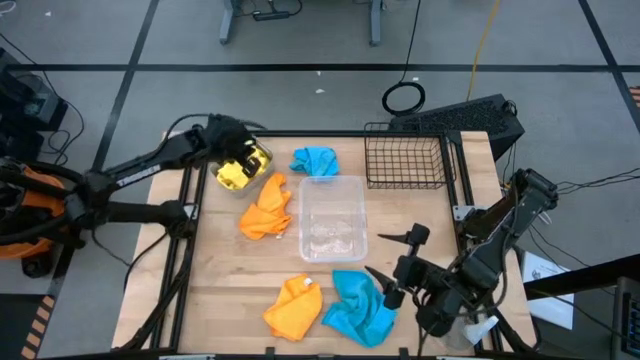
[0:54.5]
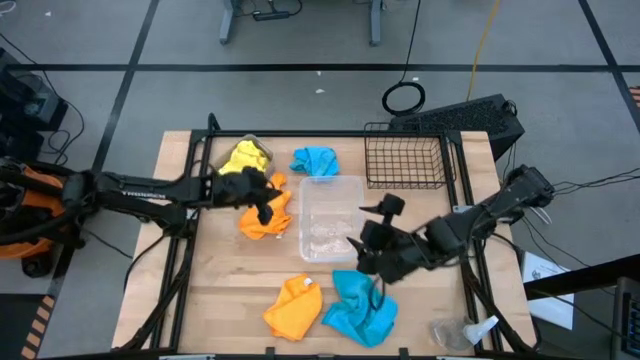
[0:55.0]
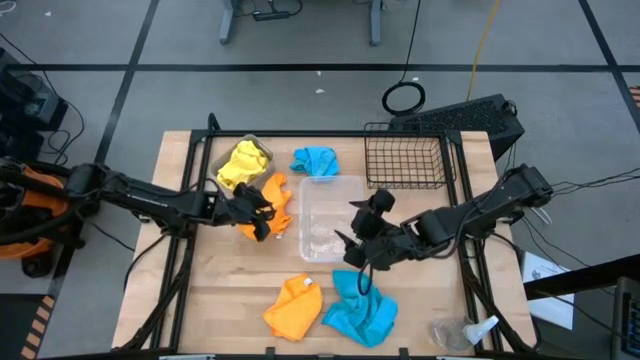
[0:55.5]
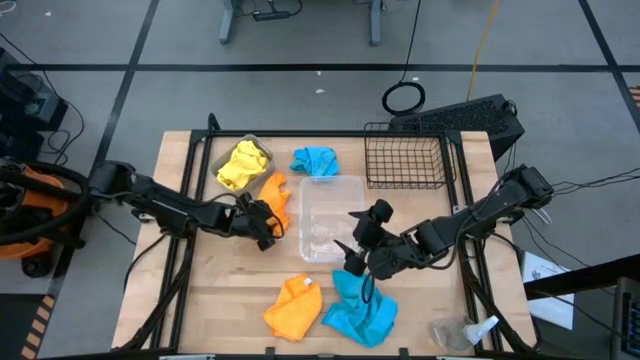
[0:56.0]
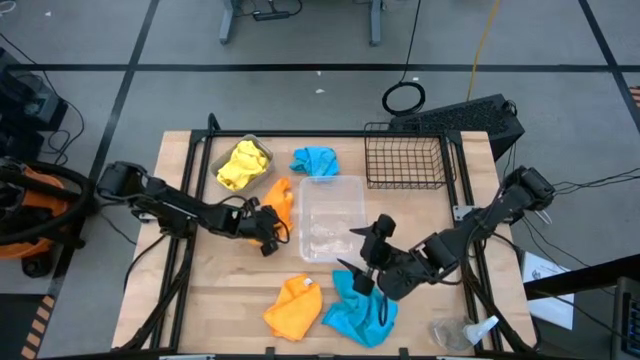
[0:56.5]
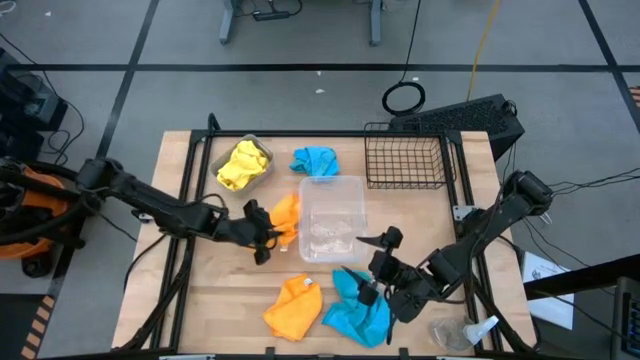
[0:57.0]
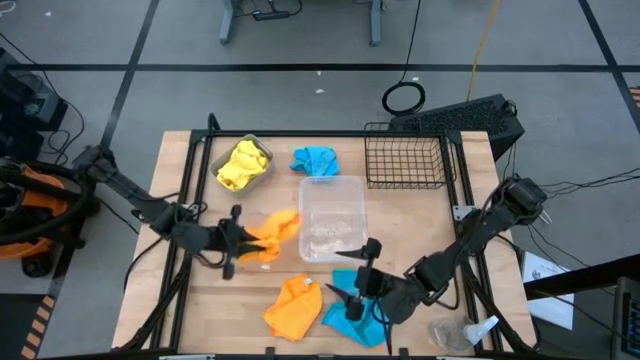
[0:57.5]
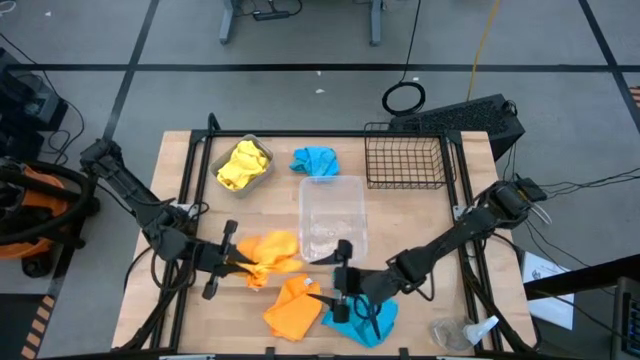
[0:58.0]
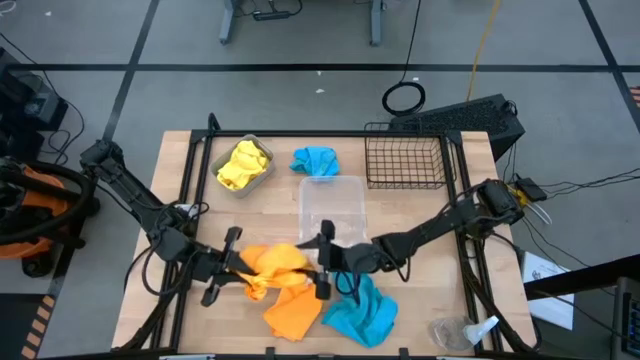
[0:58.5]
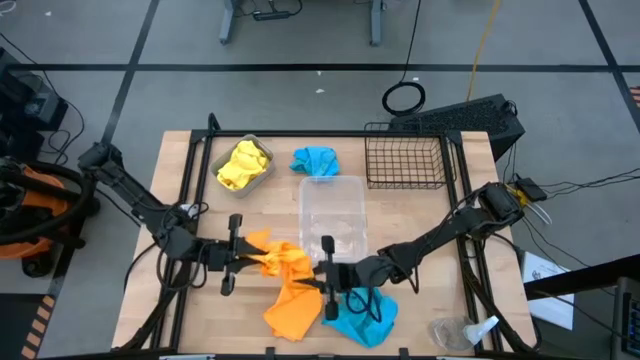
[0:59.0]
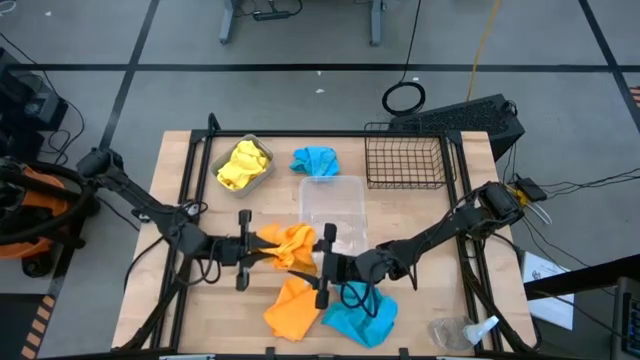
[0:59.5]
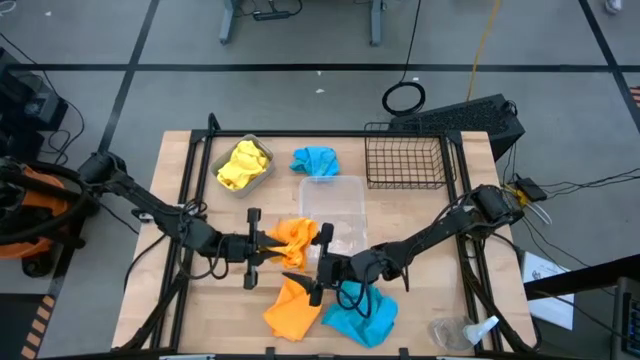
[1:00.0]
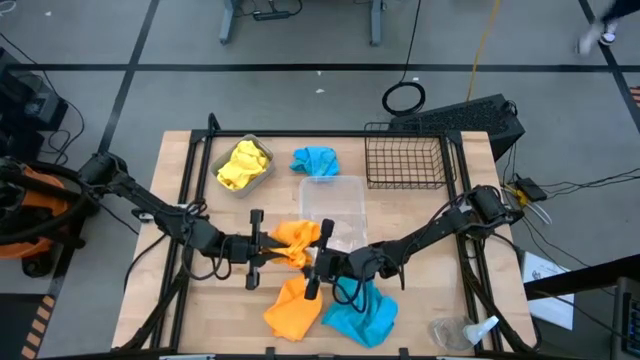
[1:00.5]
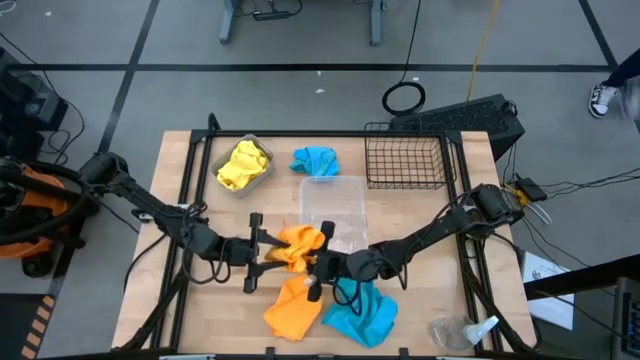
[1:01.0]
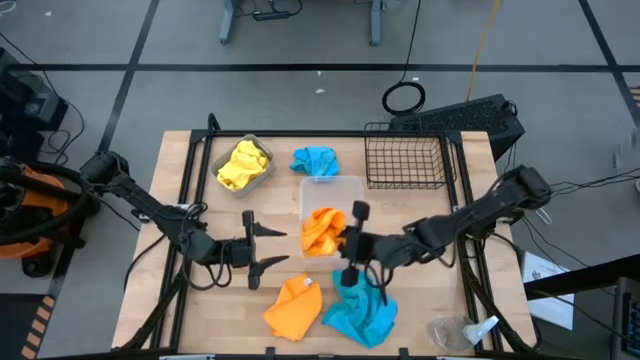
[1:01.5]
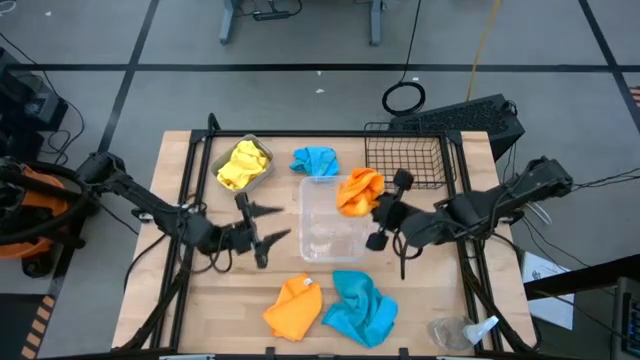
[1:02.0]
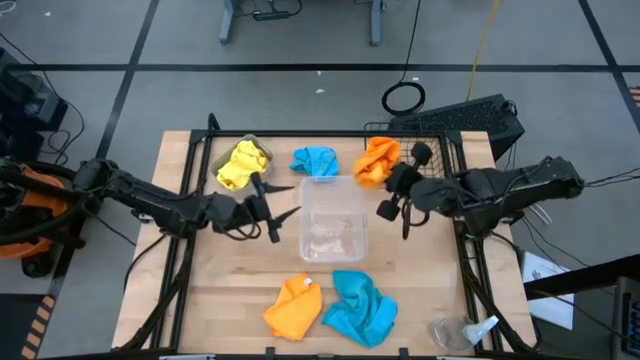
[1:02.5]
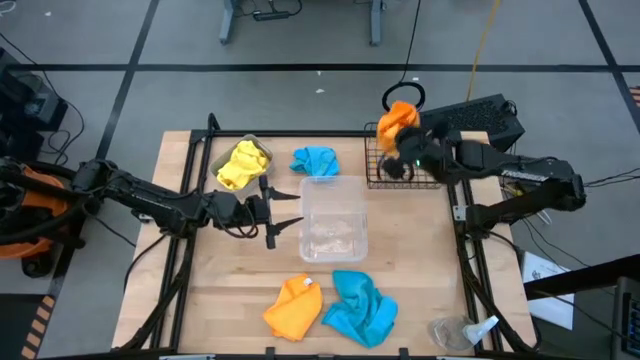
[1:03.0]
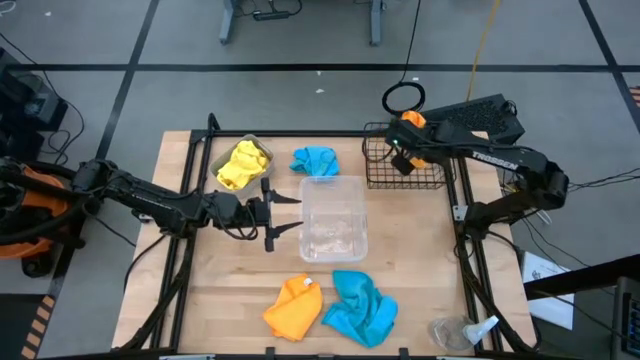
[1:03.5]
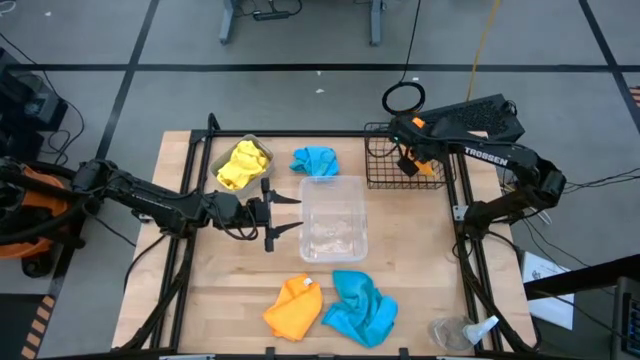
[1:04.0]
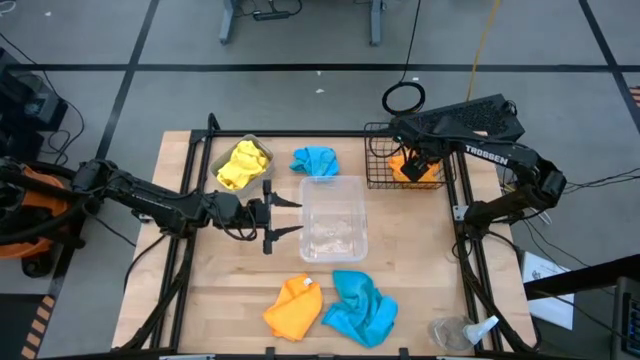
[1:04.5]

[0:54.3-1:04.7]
Task: Sort microfiber towel by color & place in baskets
Put the top orange towel into the black wire basket

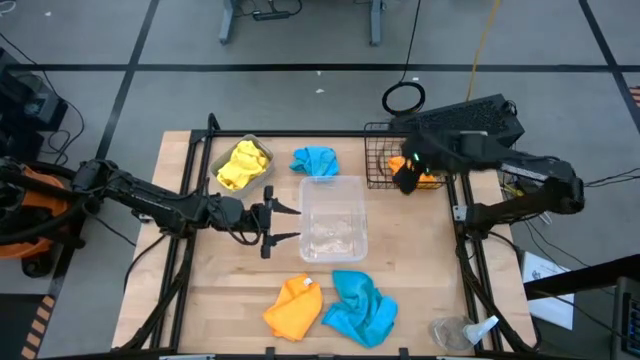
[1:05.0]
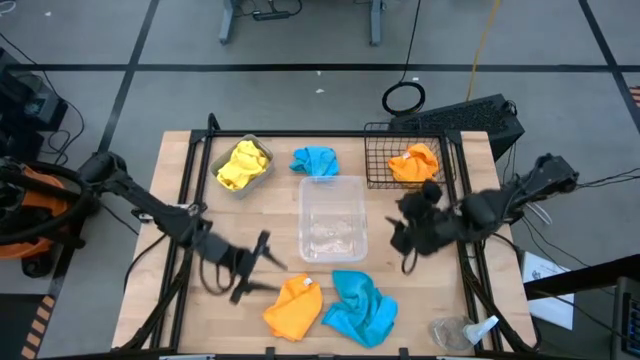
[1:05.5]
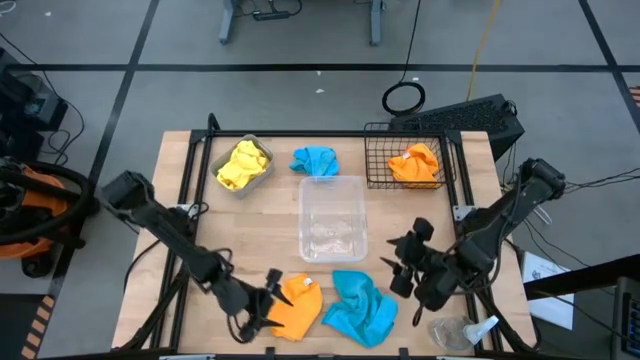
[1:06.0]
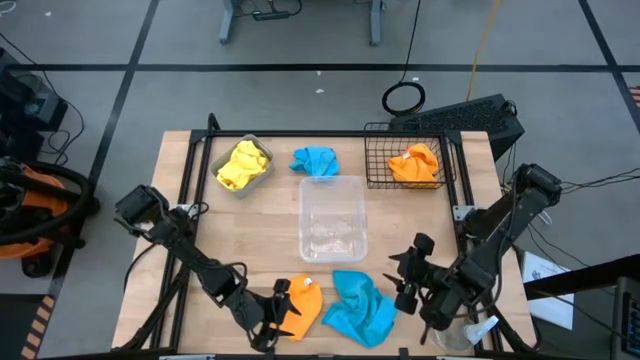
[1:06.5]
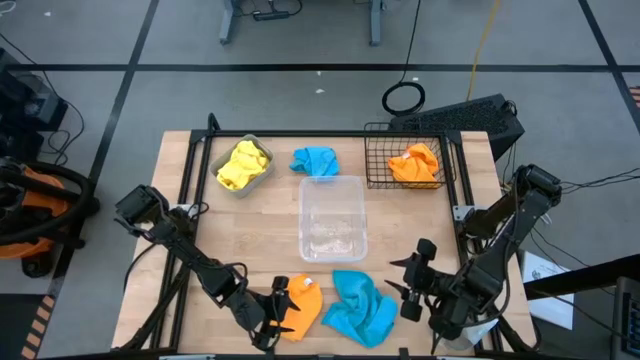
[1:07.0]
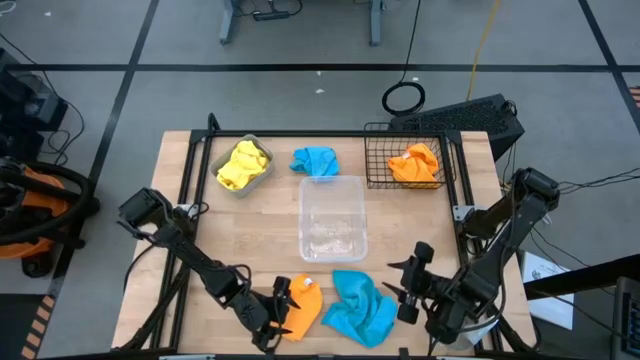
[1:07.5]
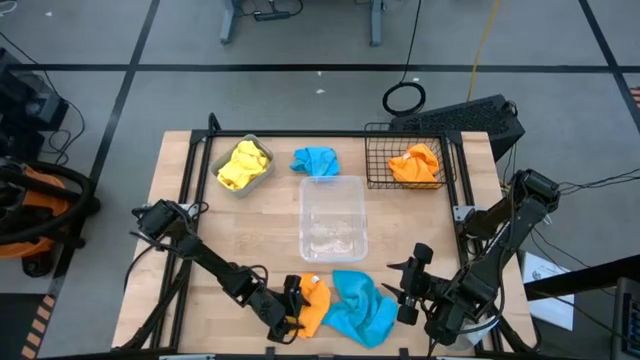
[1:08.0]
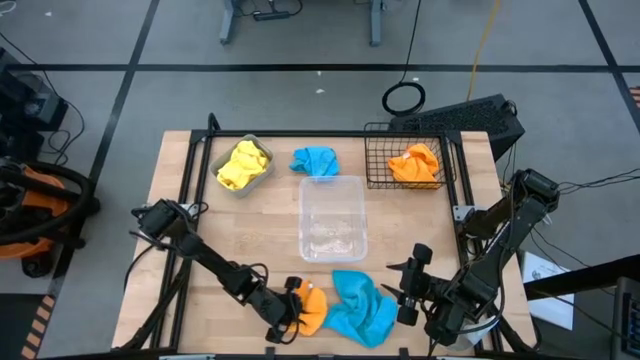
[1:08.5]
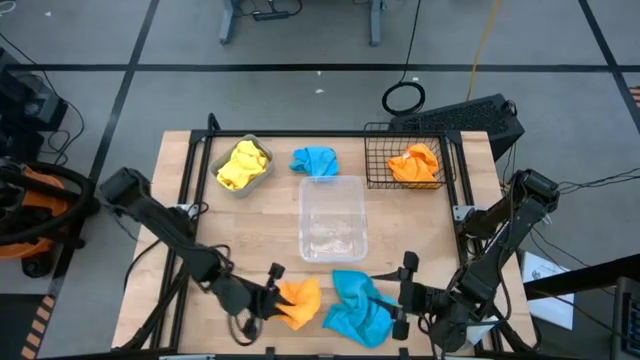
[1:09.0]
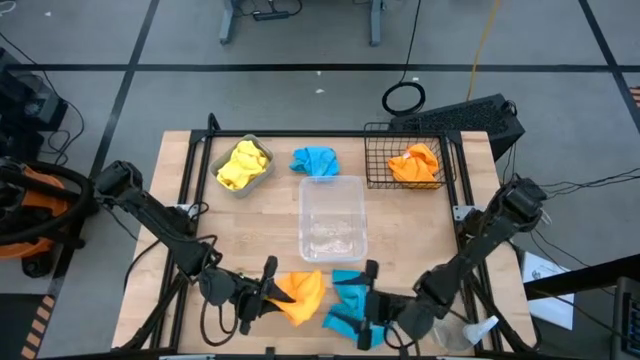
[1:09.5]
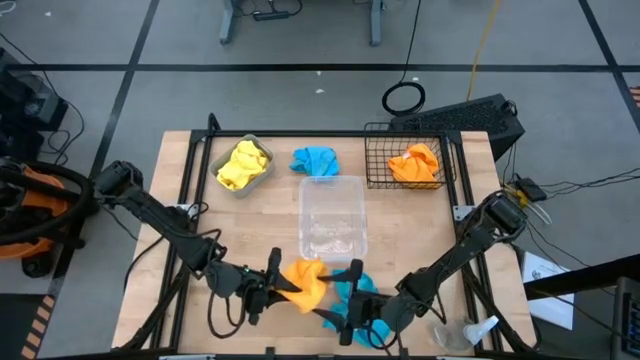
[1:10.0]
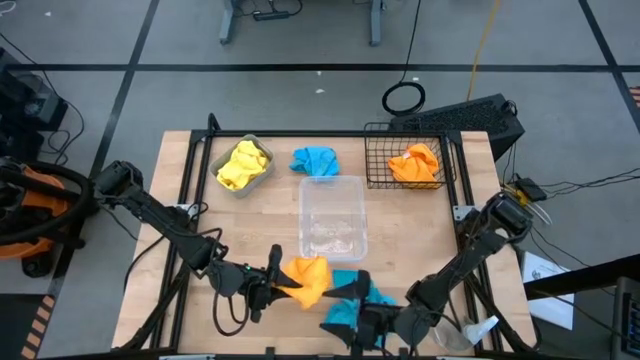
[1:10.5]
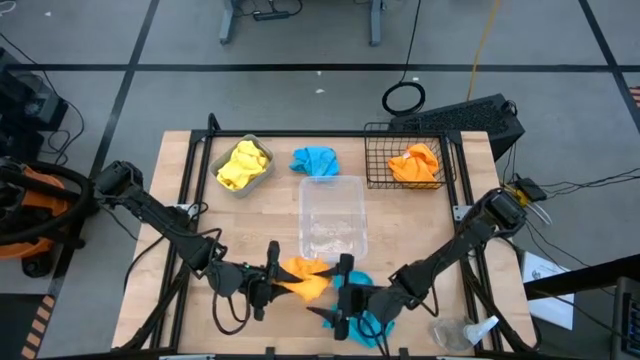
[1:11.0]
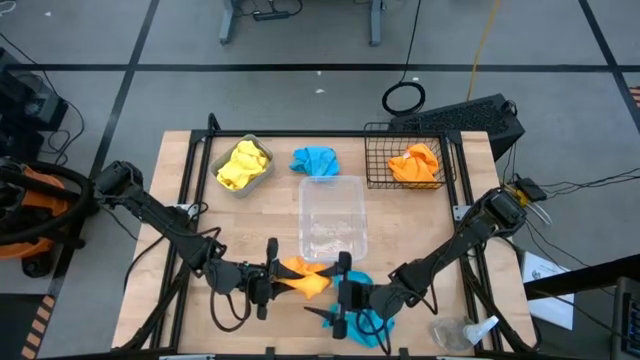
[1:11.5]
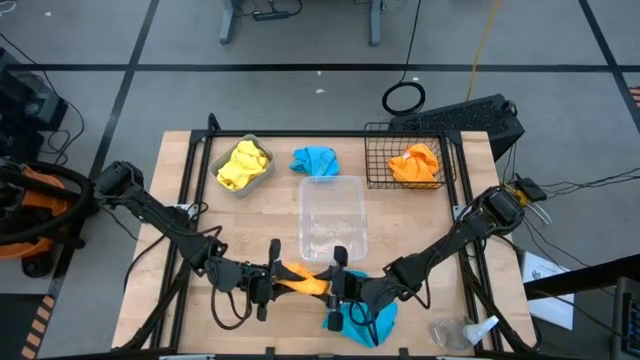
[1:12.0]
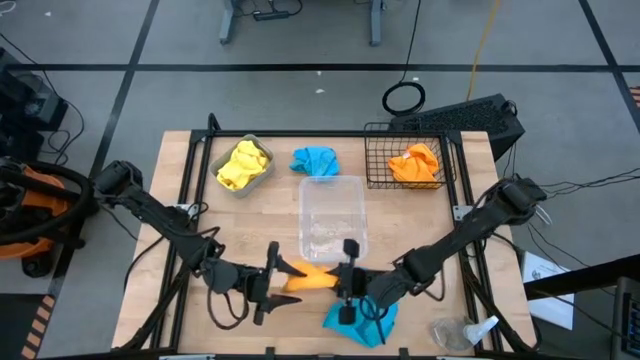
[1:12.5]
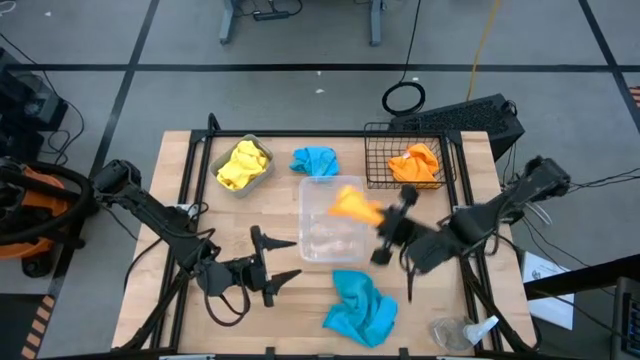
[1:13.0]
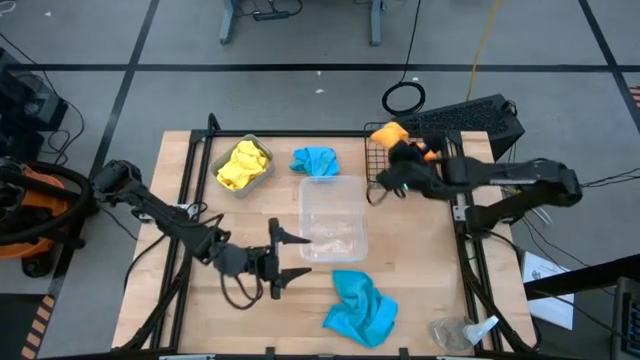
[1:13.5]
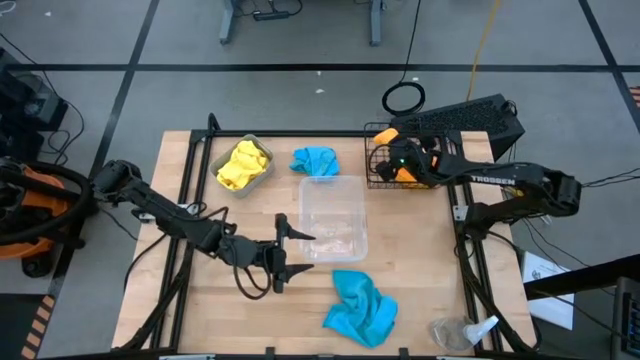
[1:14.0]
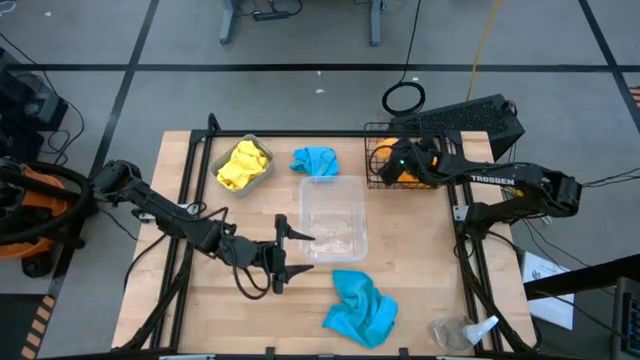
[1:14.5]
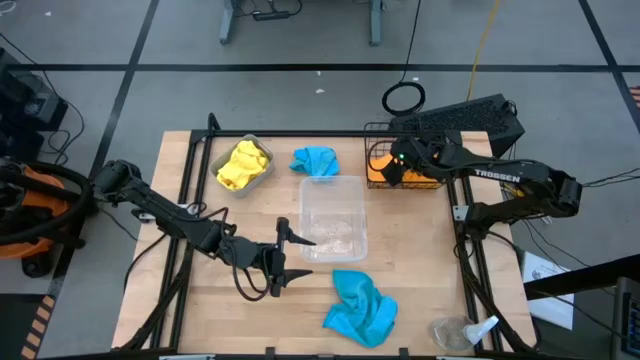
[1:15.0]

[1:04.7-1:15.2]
Put the orange towel into the black wire basket
